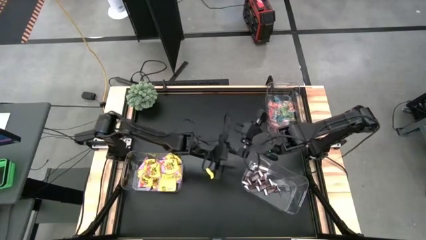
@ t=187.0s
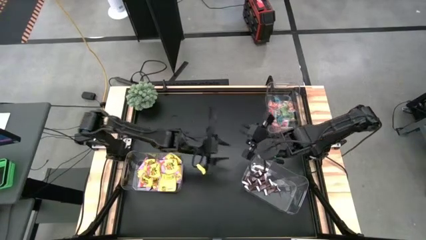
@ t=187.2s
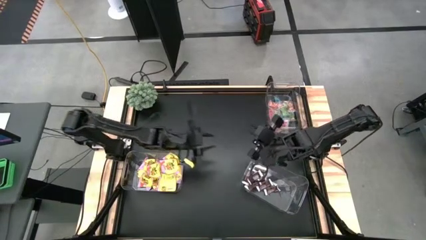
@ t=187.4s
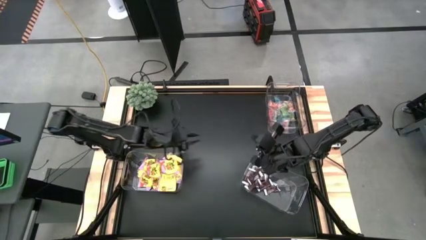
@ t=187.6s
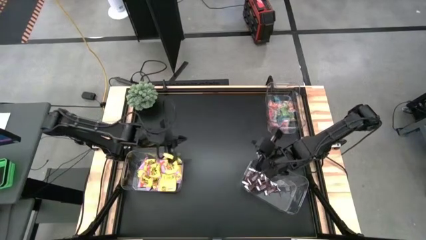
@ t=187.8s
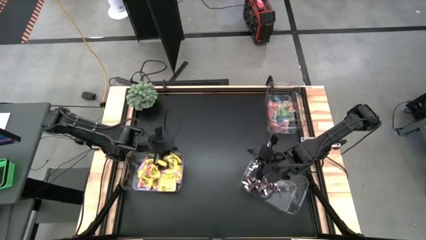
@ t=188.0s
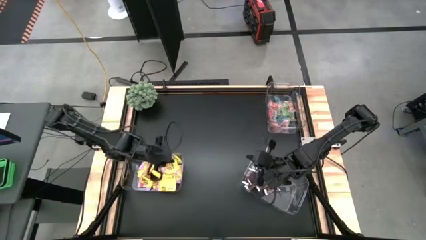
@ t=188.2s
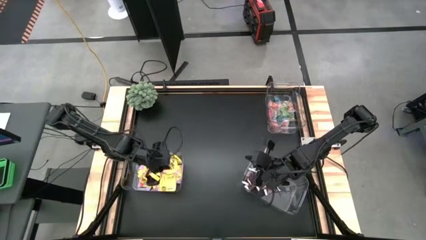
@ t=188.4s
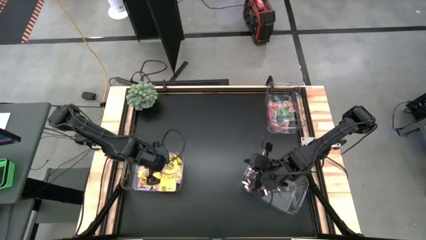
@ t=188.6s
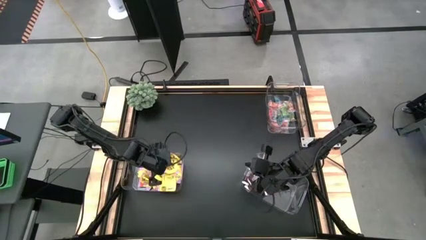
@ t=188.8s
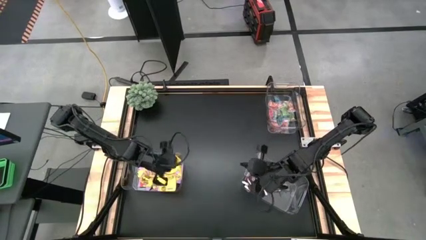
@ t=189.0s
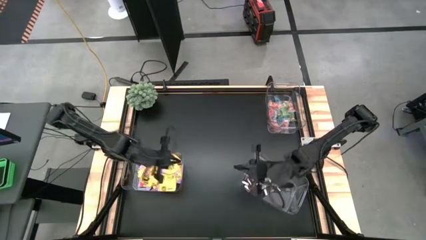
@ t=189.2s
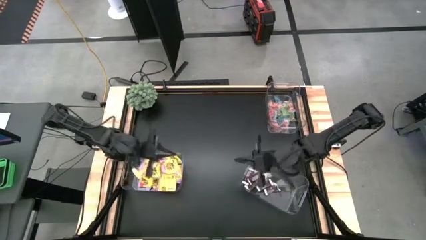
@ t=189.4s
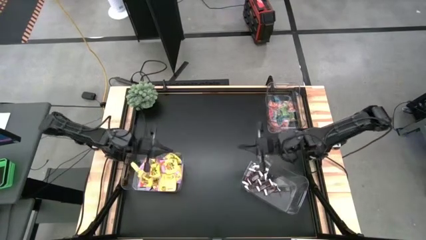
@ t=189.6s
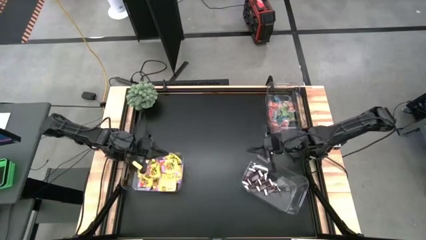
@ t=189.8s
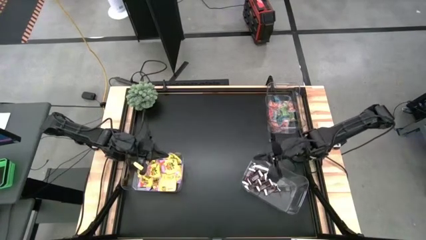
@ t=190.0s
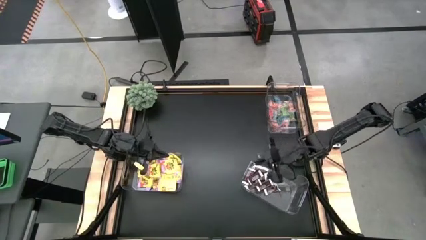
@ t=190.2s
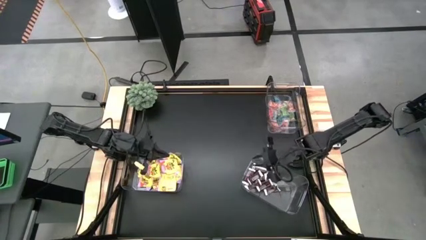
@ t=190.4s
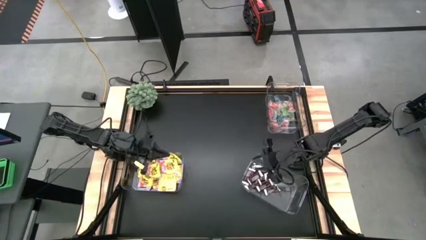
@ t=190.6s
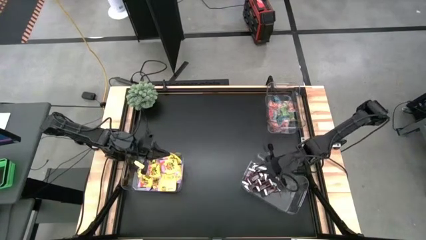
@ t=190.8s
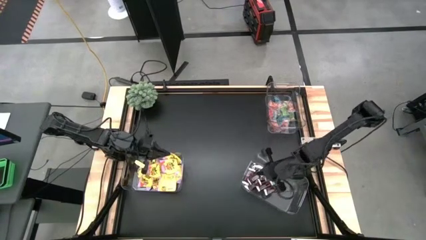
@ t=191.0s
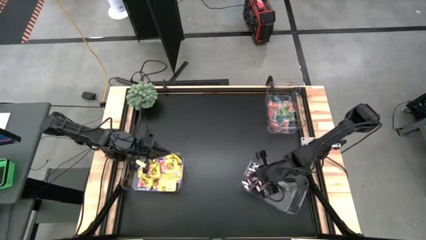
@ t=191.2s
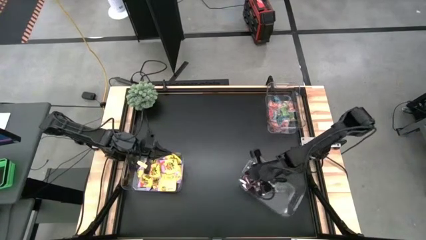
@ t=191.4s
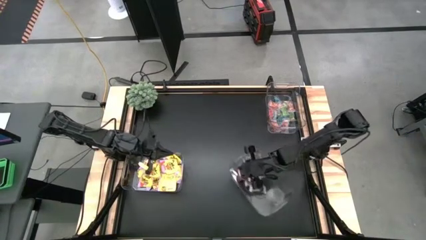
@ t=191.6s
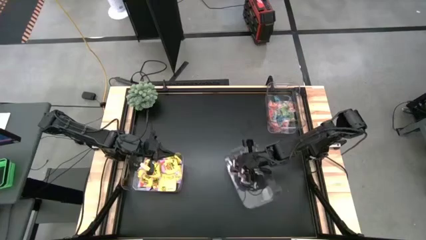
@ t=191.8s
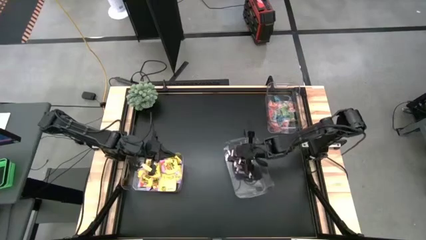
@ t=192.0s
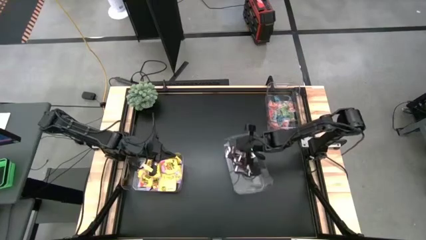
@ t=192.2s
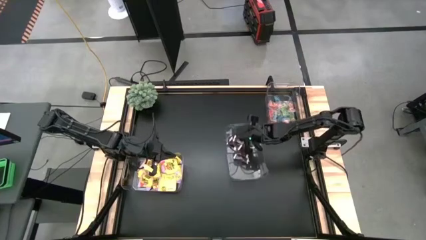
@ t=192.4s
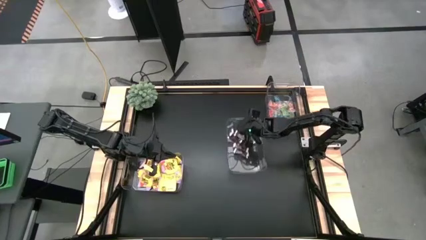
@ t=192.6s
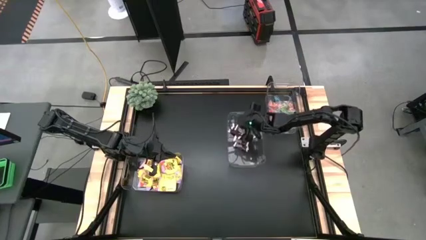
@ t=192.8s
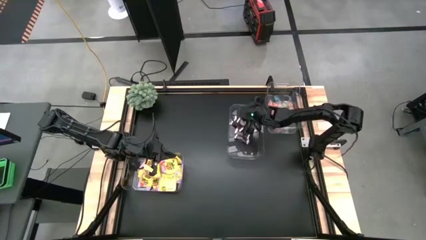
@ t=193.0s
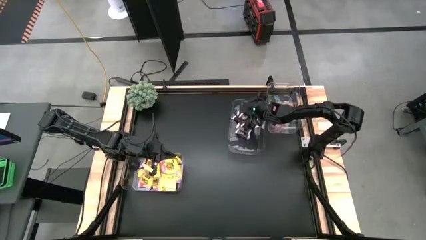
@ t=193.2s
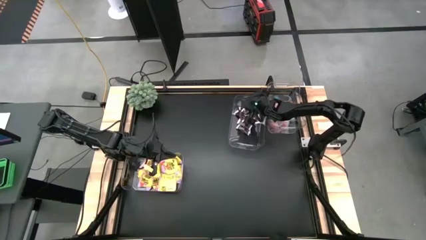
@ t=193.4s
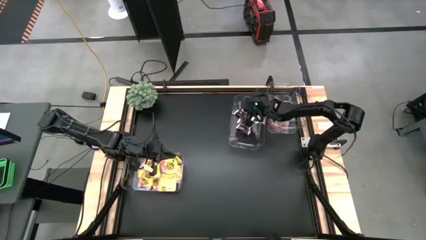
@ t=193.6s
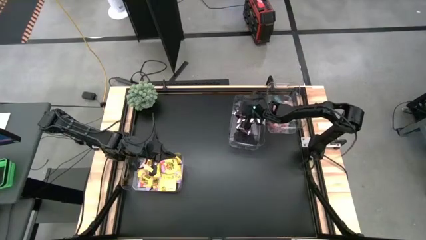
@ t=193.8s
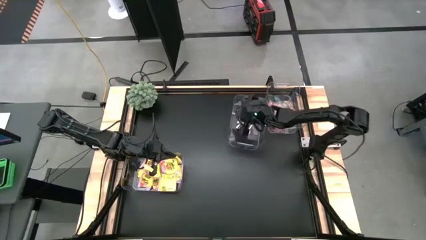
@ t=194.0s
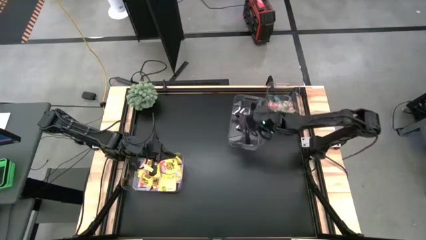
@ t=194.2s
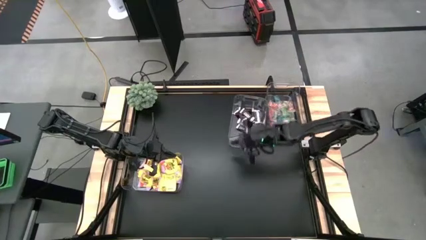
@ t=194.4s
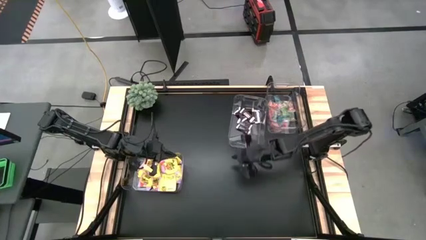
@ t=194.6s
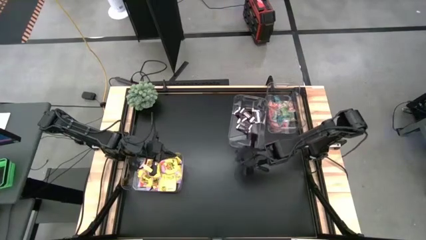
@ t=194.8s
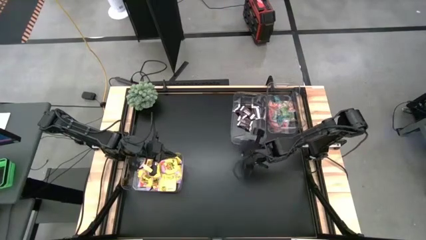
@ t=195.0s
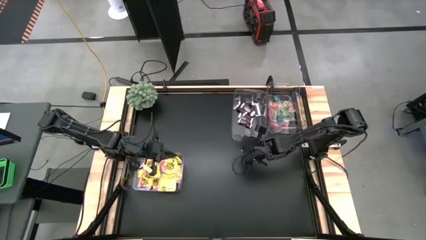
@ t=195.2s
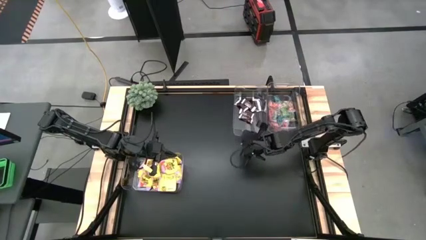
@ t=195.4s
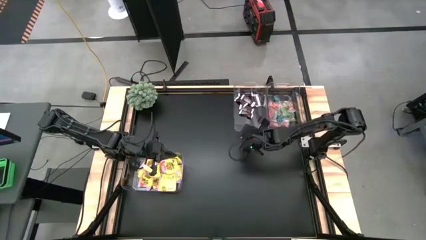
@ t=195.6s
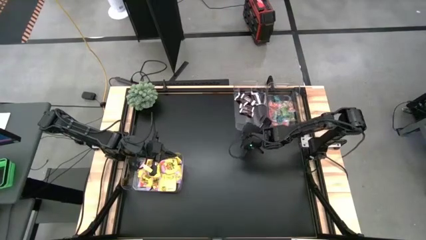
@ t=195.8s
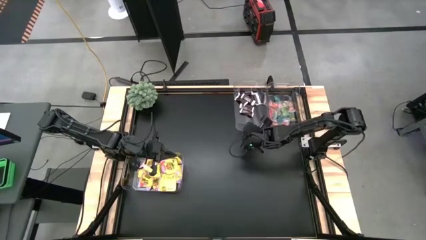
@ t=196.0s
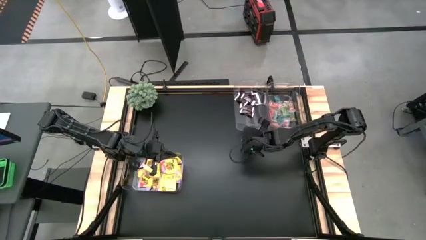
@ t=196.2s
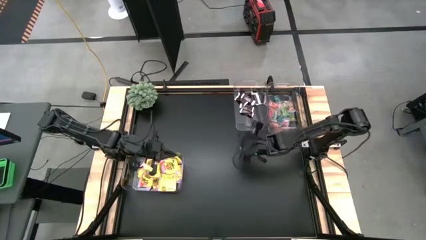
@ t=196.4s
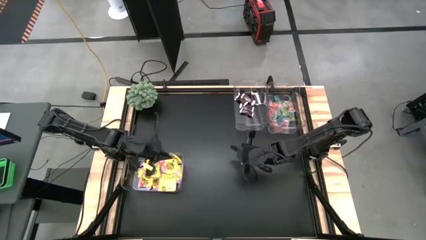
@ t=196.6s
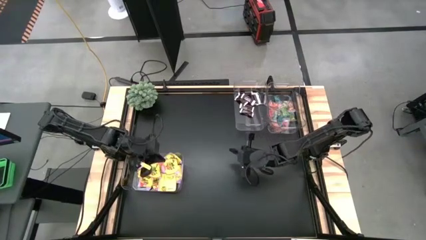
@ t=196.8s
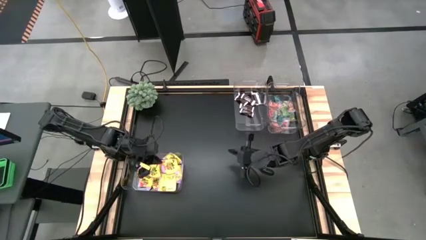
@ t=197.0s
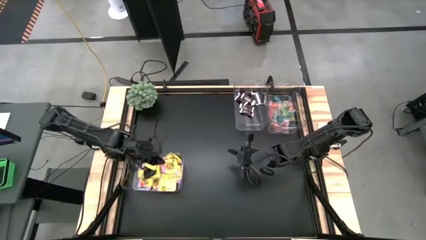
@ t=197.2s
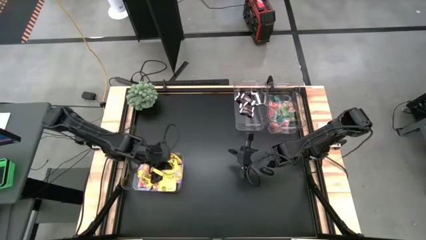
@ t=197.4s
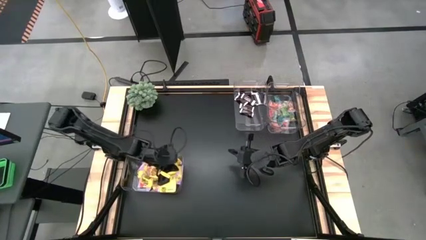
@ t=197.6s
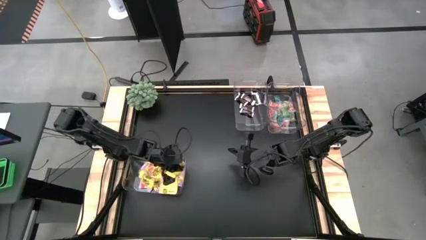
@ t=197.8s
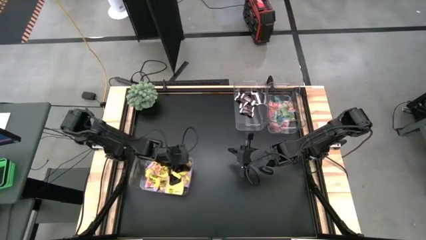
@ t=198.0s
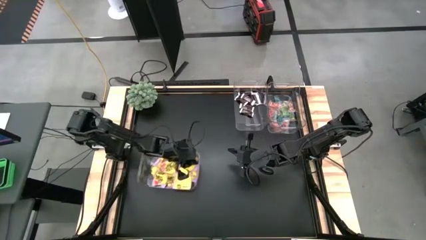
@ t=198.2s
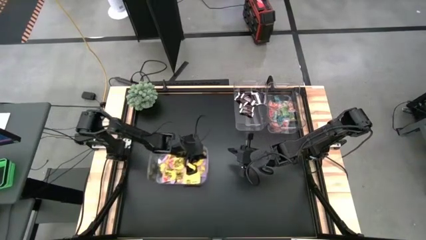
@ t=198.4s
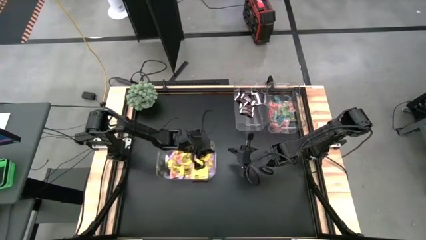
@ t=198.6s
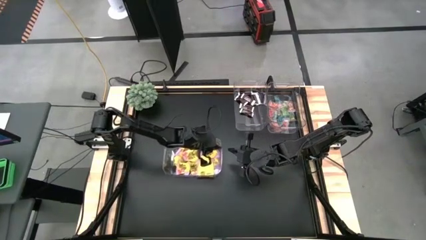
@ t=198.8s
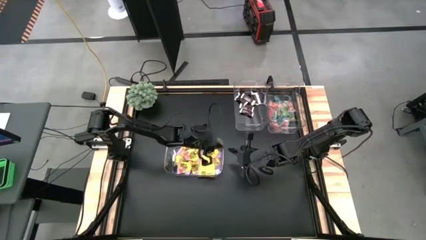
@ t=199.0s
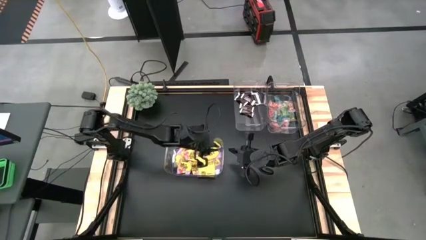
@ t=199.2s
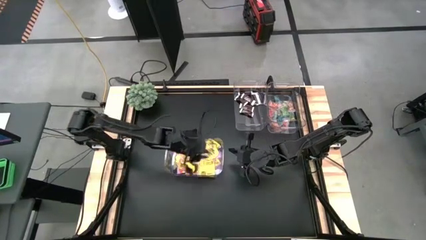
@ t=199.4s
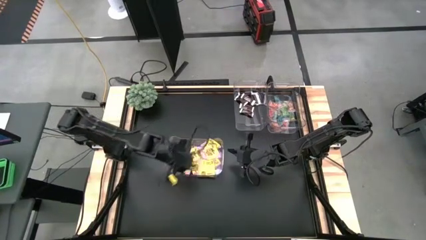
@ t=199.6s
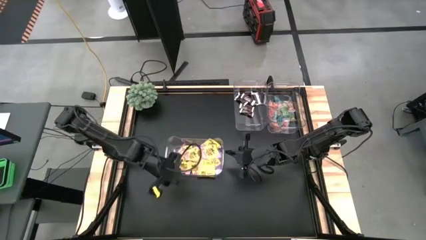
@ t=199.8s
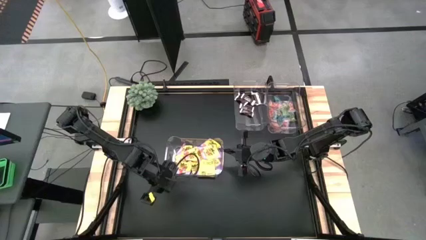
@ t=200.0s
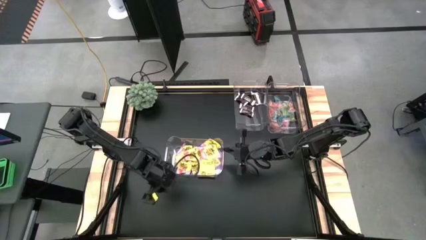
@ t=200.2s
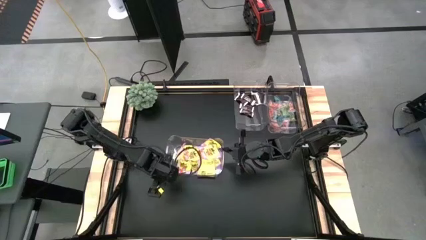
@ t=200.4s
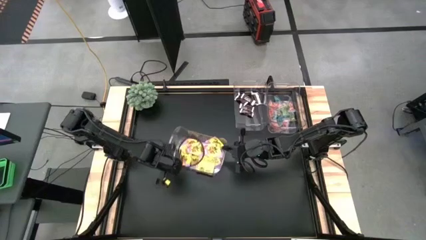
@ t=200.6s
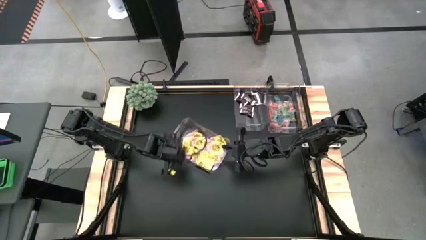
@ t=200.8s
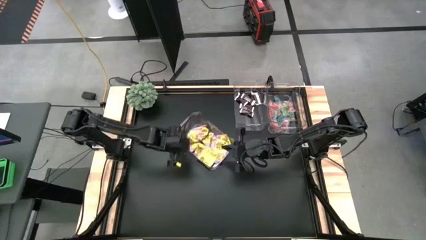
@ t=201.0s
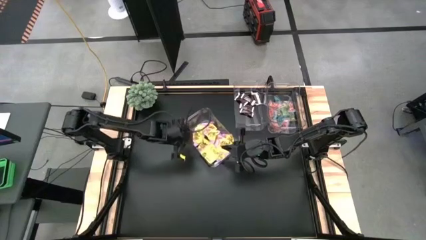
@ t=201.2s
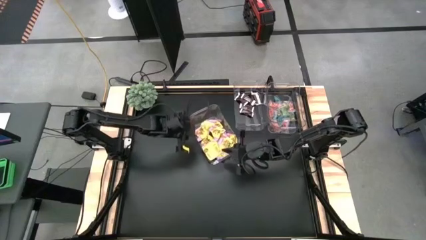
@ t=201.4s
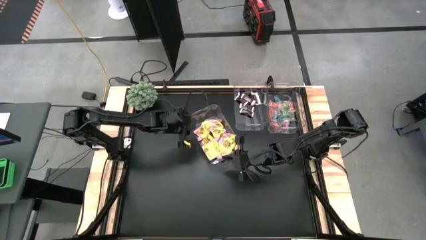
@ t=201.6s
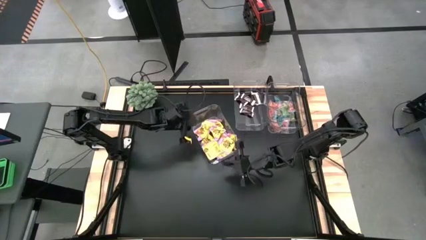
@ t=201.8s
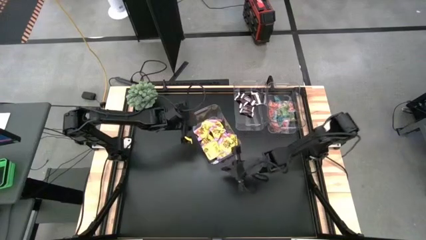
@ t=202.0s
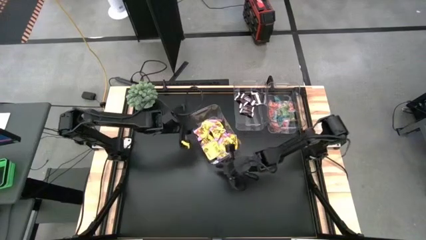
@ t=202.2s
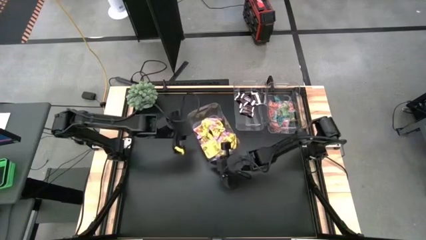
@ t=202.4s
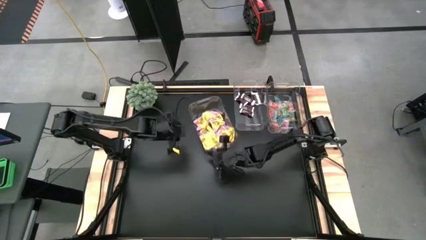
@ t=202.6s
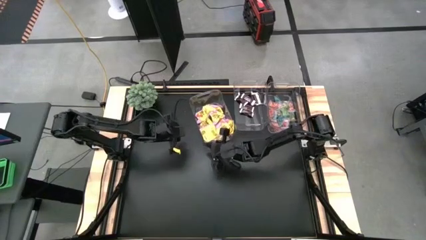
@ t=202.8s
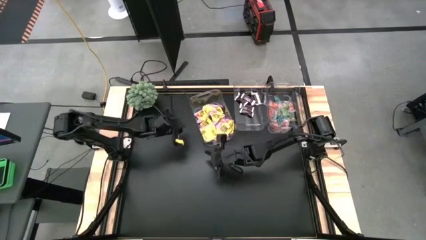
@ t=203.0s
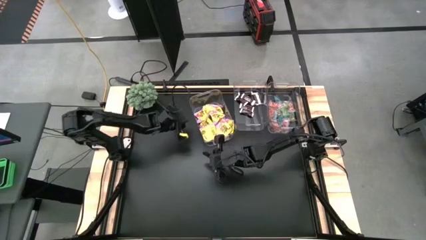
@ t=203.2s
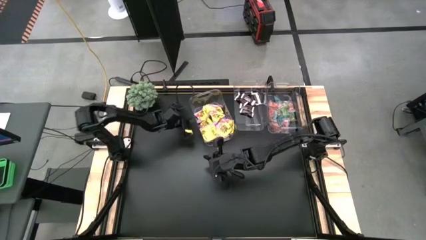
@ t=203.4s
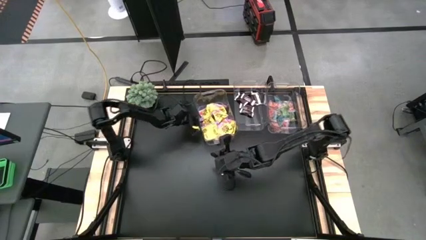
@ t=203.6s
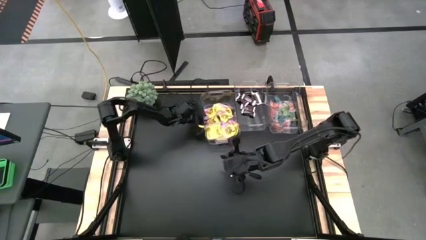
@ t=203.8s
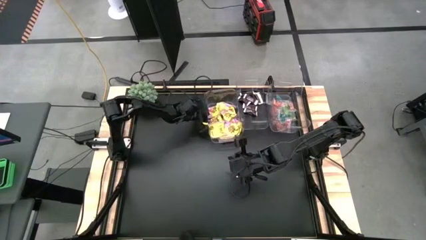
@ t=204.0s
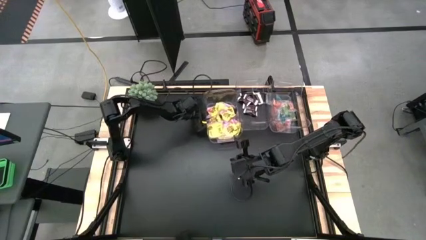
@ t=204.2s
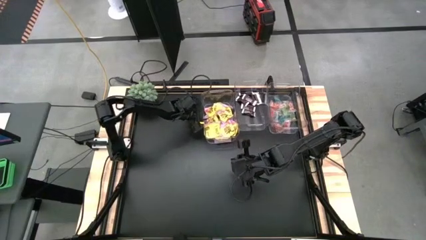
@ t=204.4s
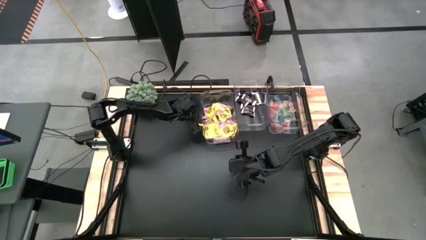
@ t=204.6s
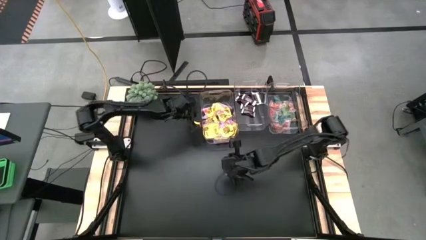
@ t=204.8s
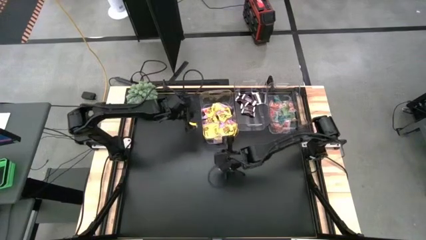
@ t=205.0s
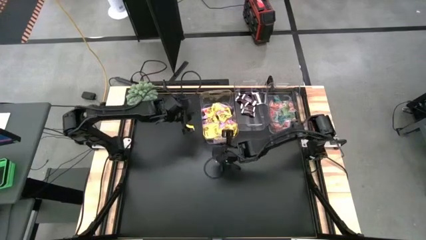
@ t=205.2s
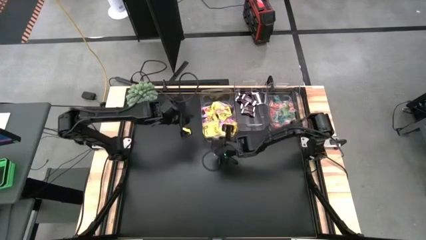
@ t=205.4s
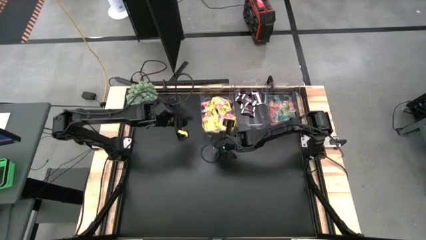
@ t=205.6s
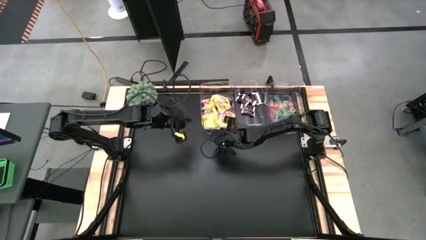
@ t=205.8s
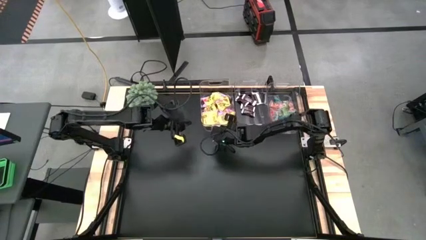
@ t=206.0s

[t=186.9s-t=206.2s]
Task: Sort candy
Move the bottom right transparent container to the left side of the top right transparent container
